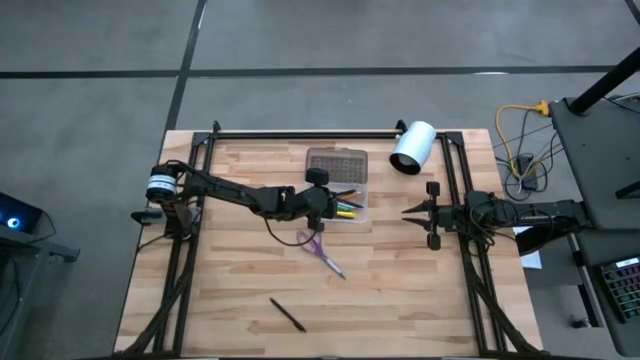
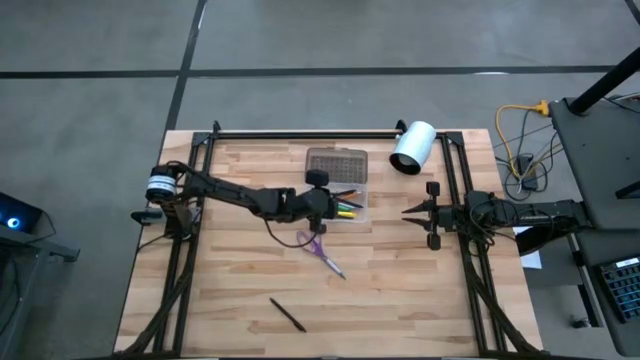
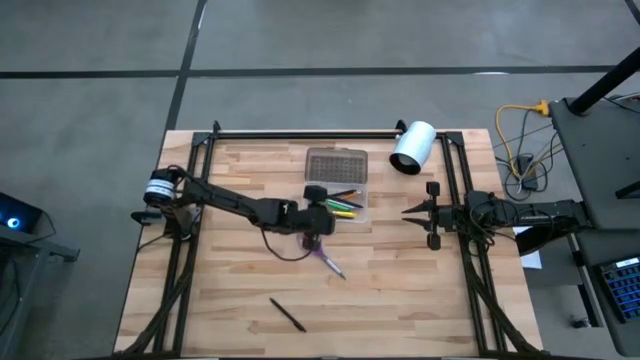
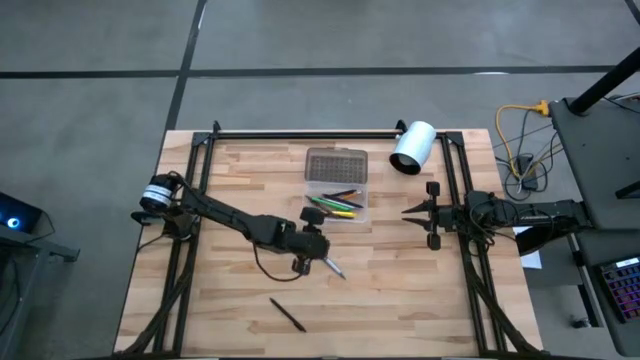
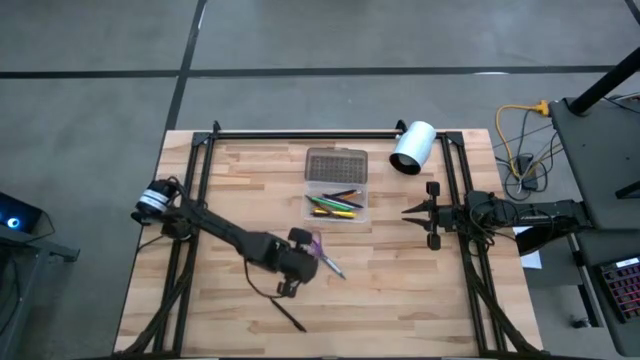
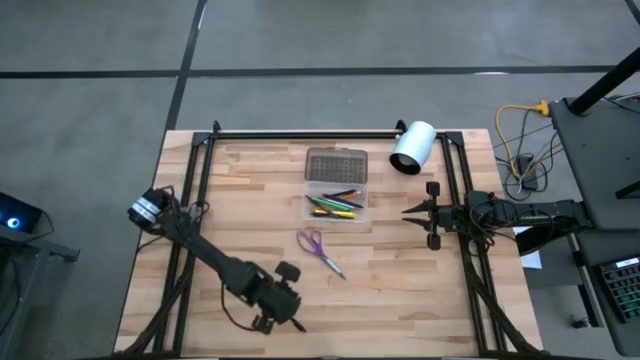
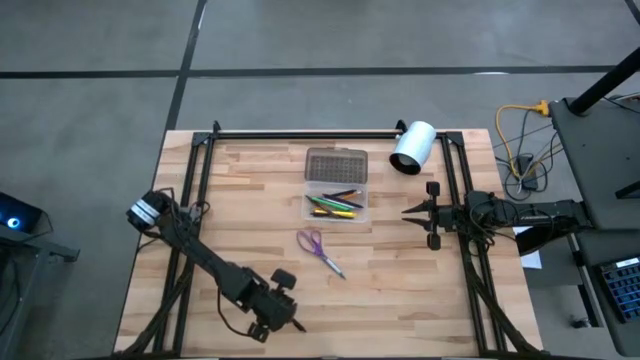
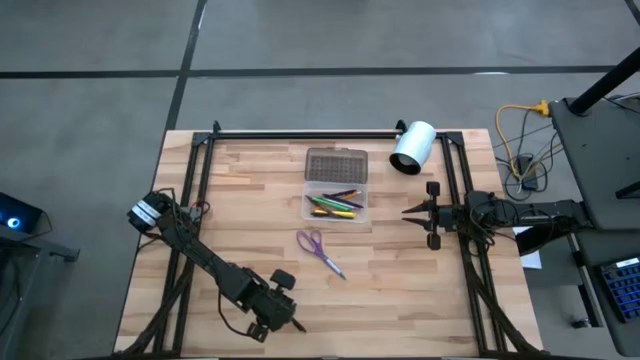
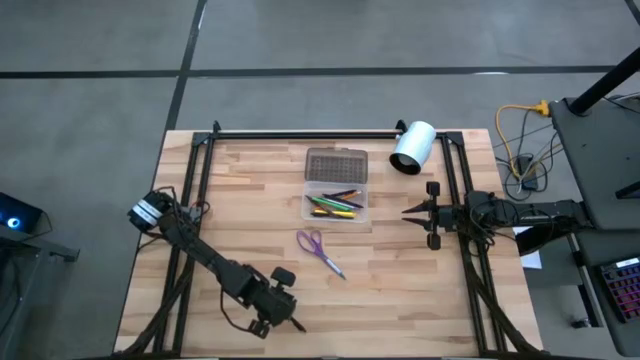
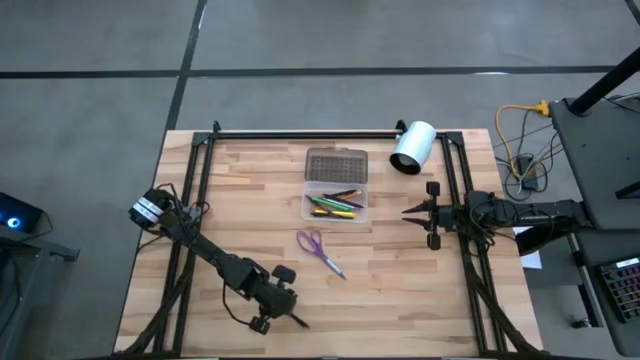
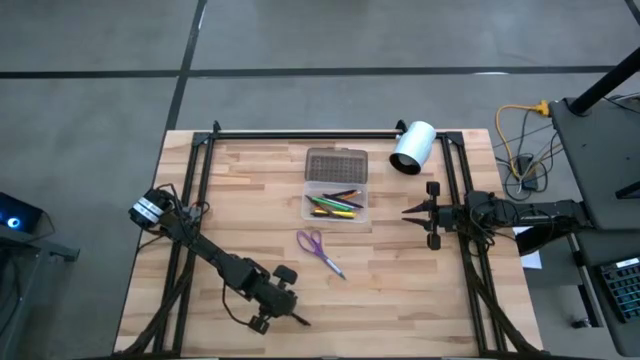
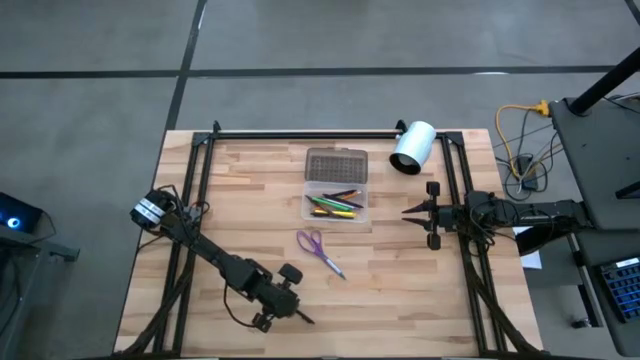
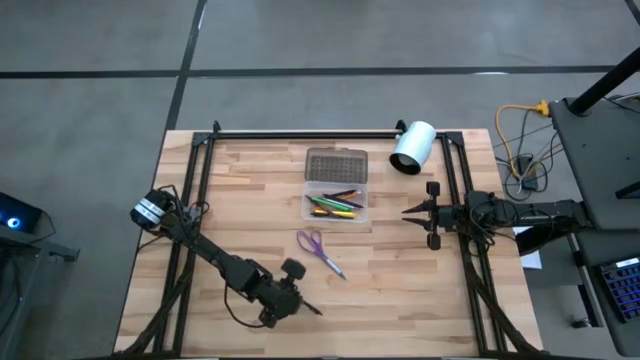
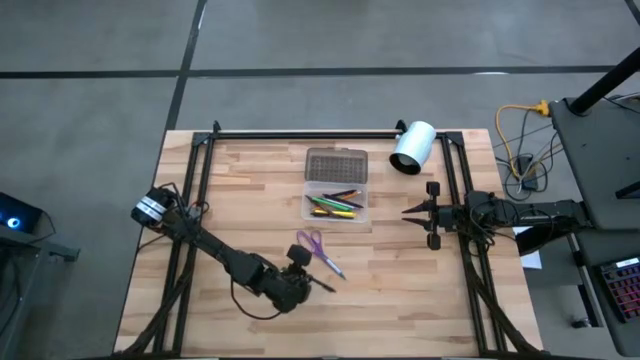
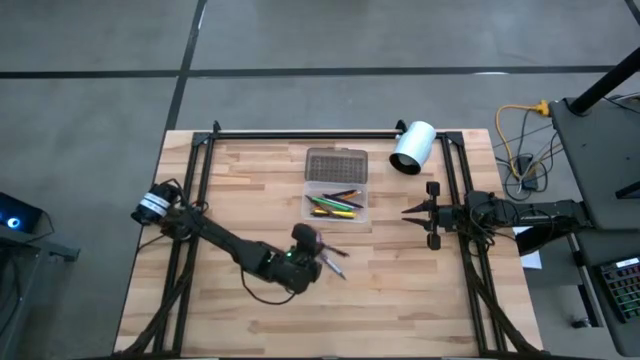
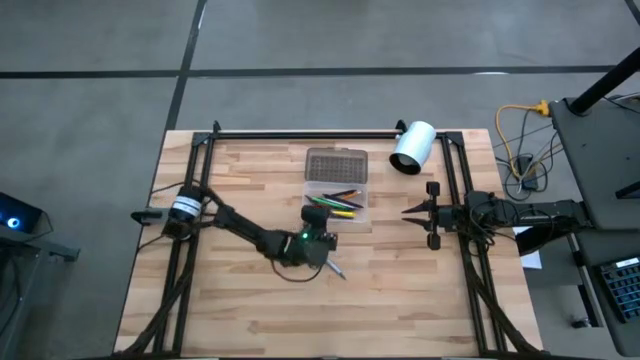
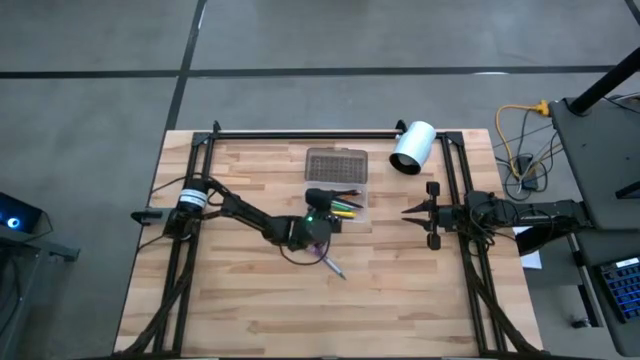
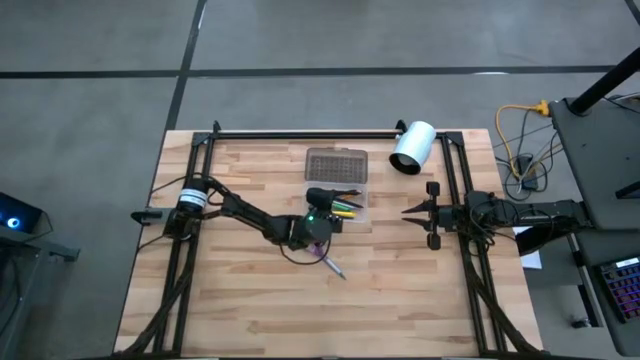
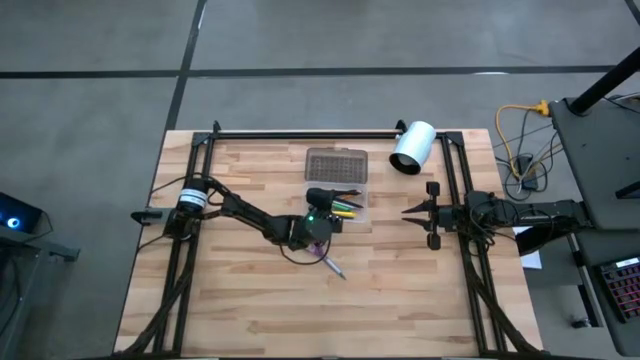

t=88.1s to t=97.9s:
Task: Pick & place school supplies into a supply box
Put the black pen into the transparent bin

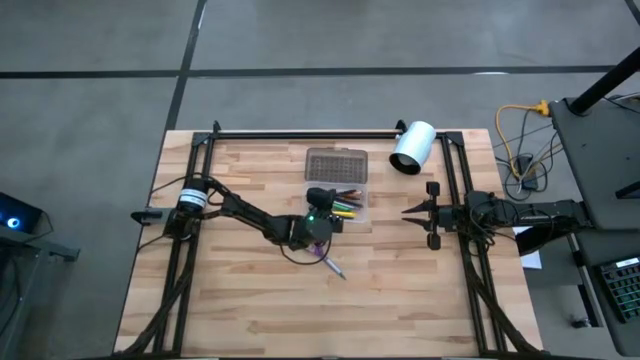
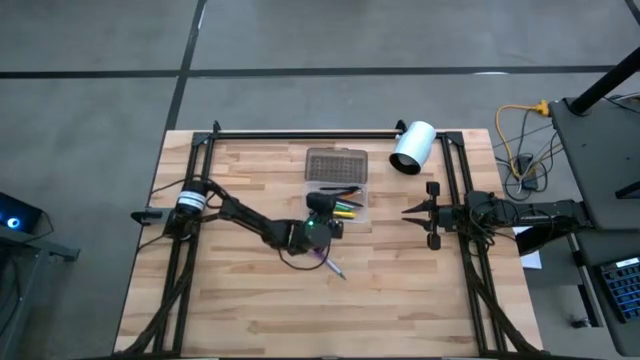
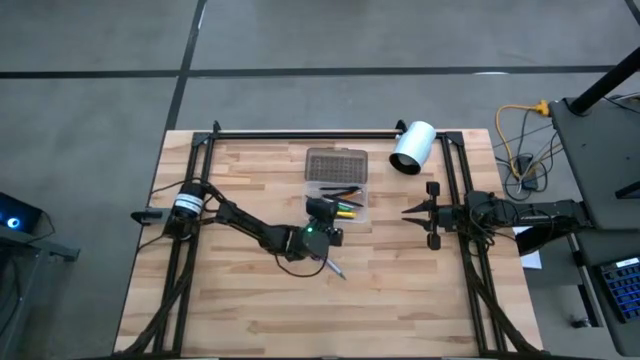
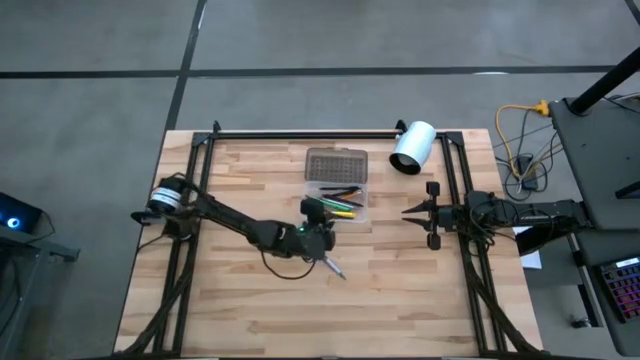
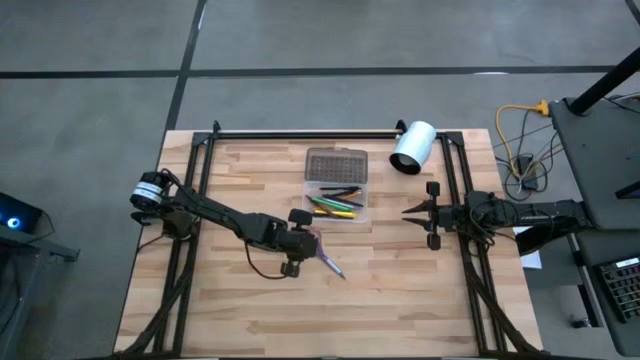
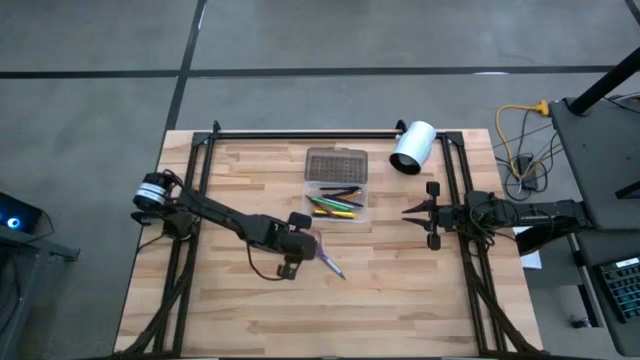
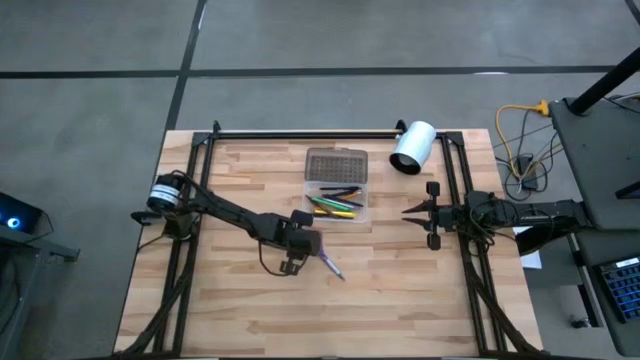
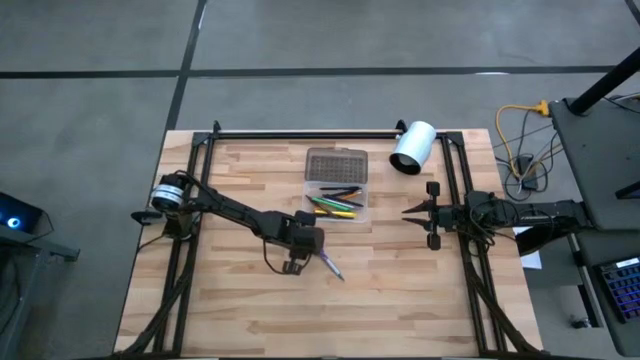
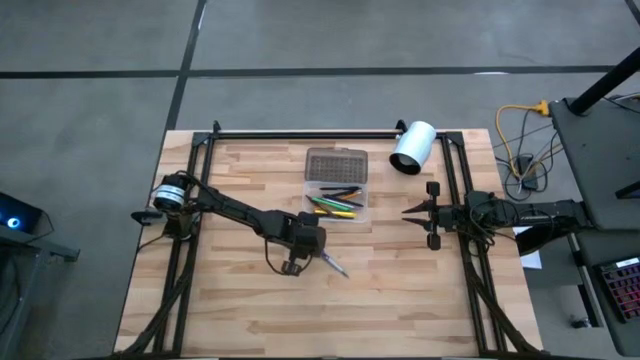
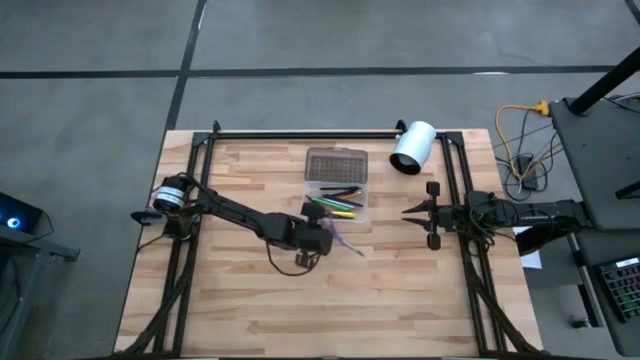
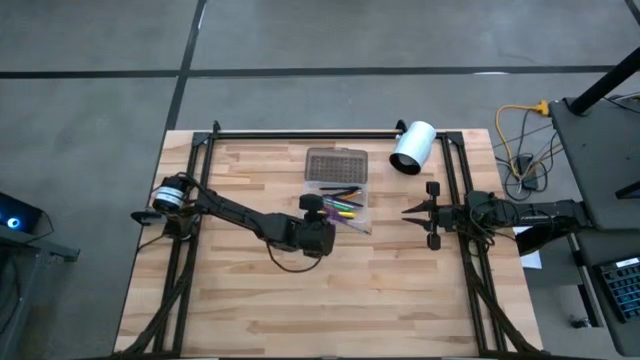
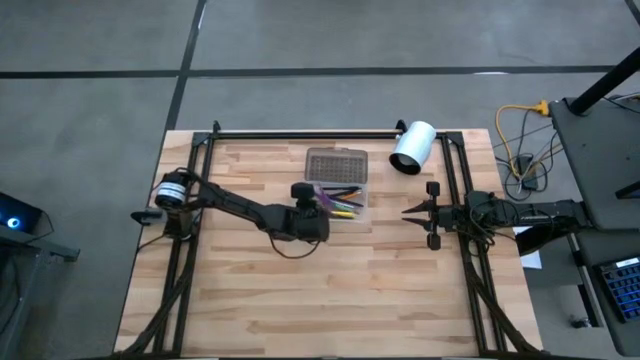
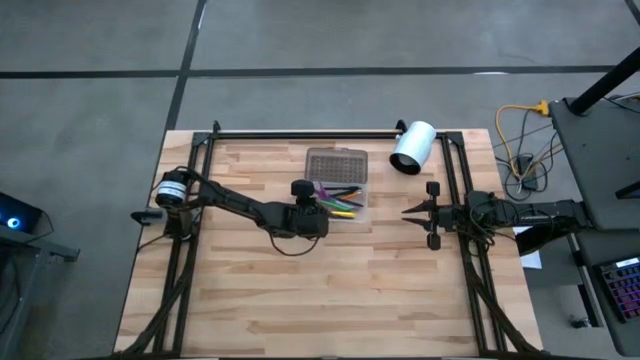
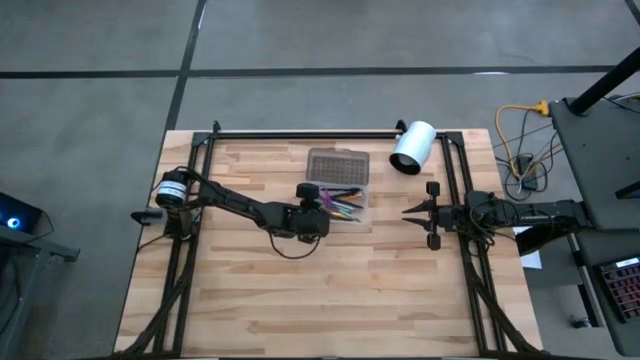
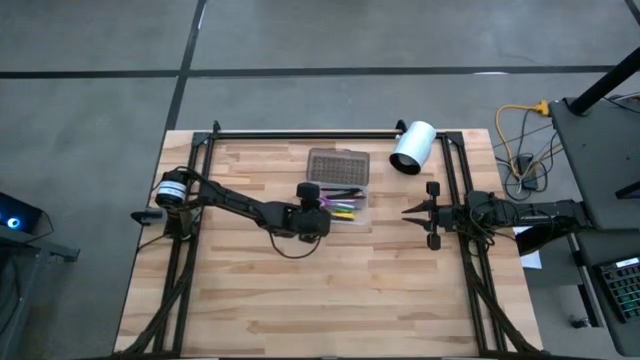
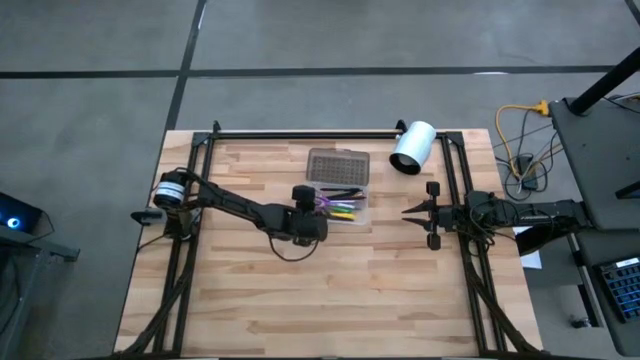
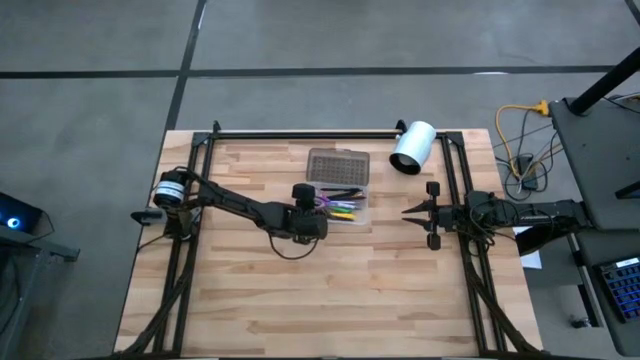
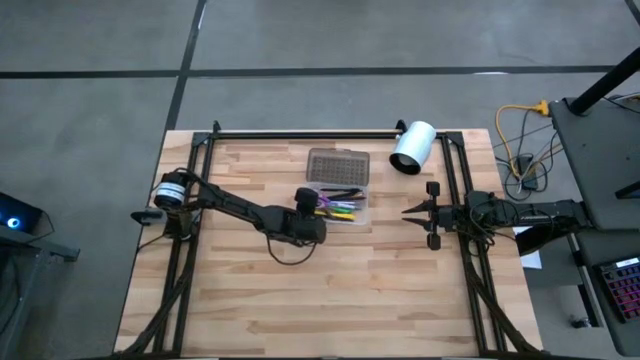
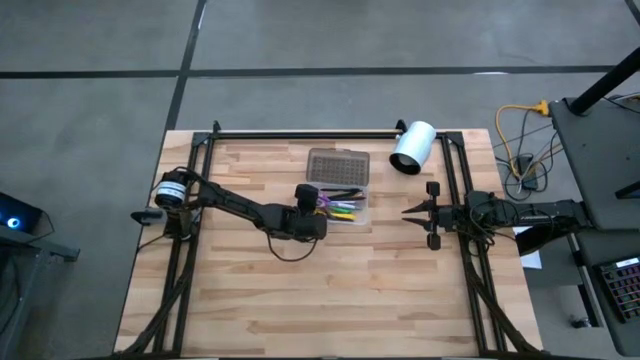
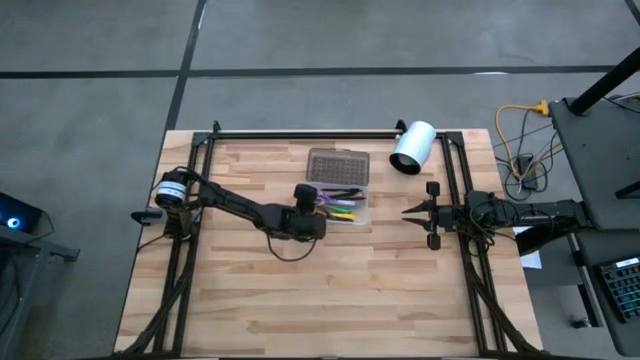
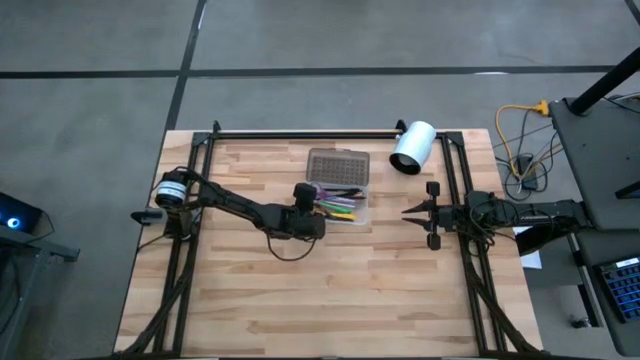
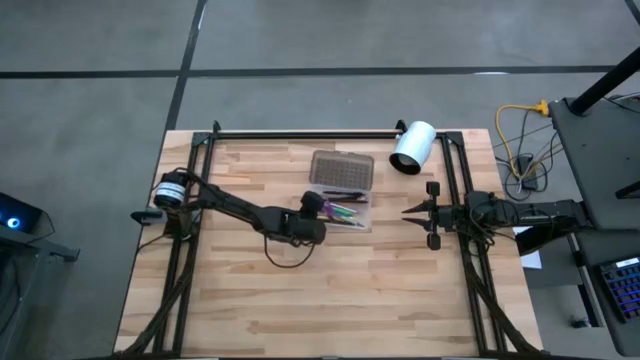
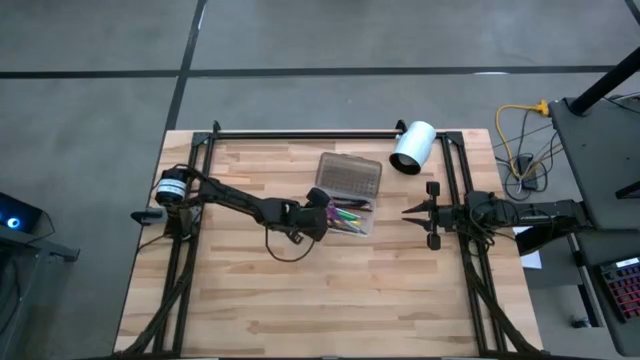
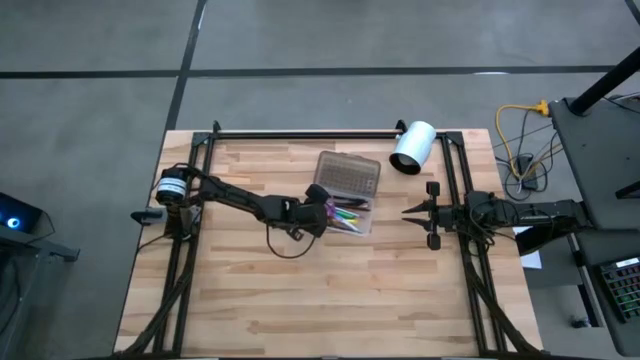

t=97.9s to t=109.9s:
Put the purple scissors into the transparent bin

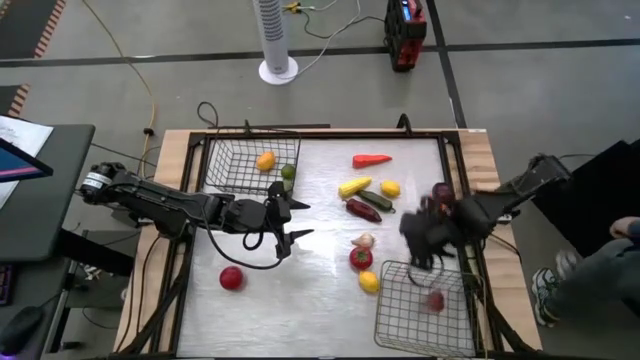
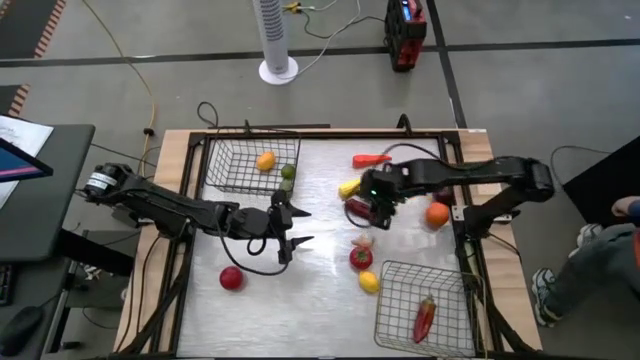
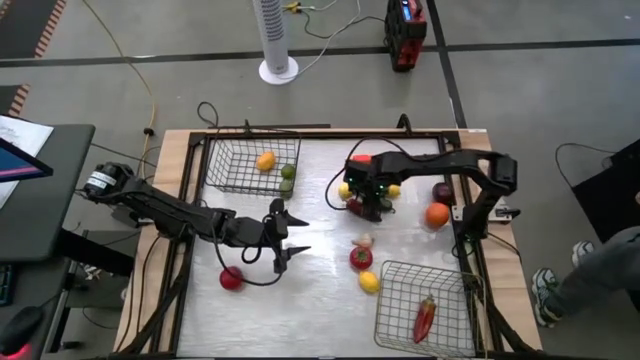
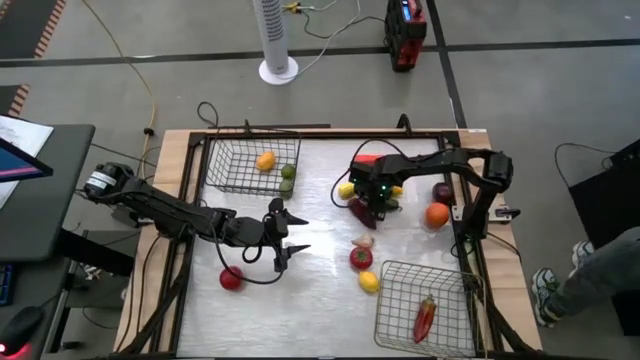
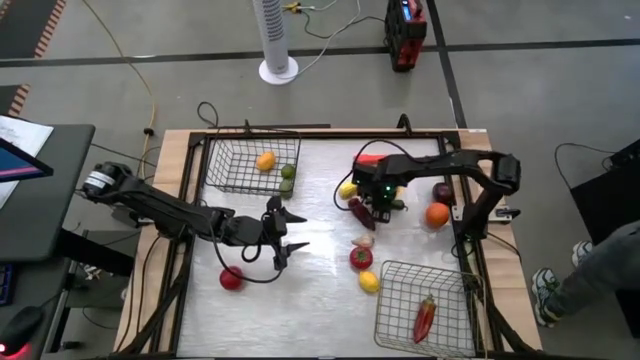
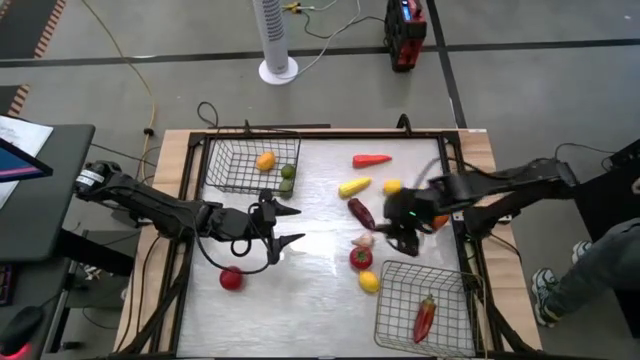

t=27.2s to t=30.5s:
Task: Sort produce into baskets
Put the green chili pepper into the golden wire basket
